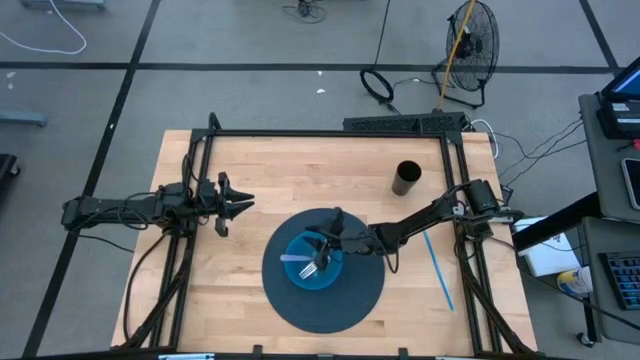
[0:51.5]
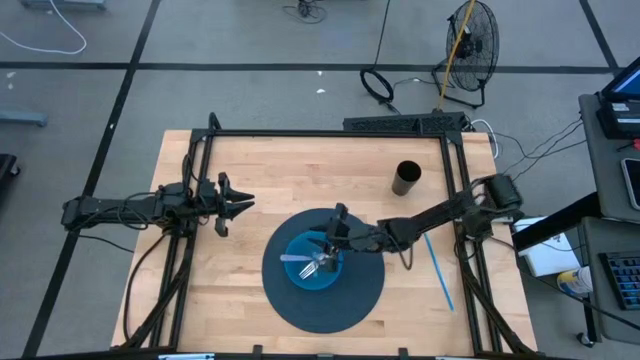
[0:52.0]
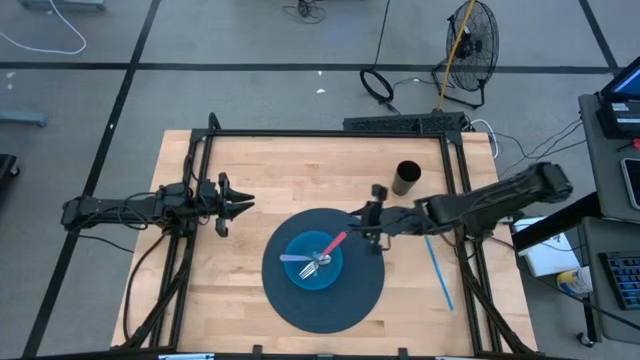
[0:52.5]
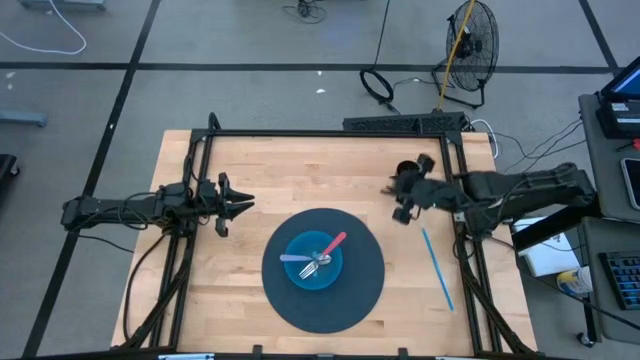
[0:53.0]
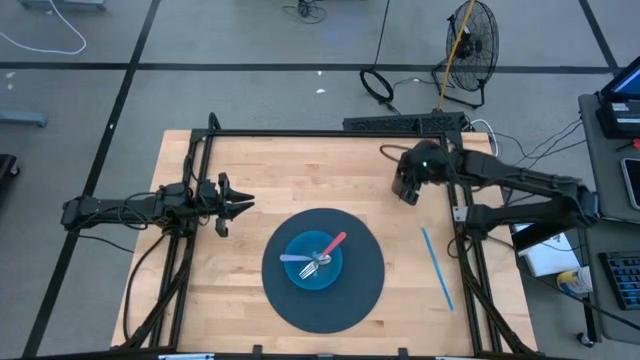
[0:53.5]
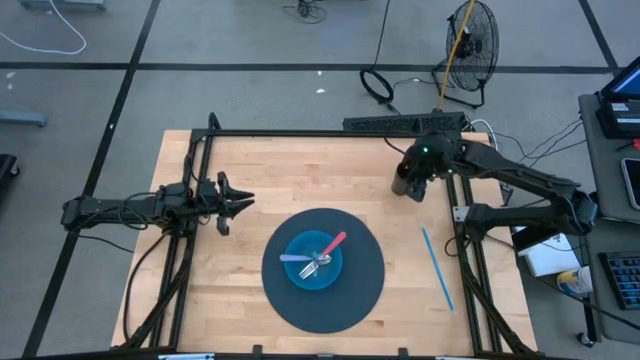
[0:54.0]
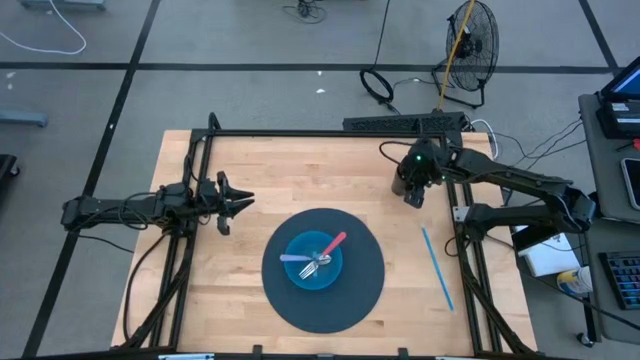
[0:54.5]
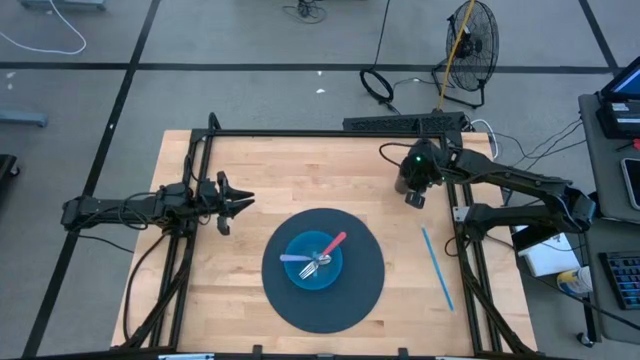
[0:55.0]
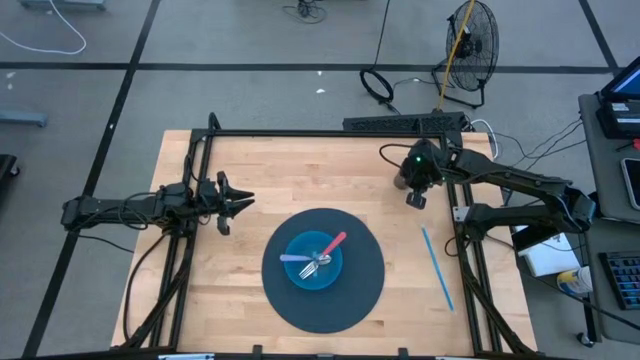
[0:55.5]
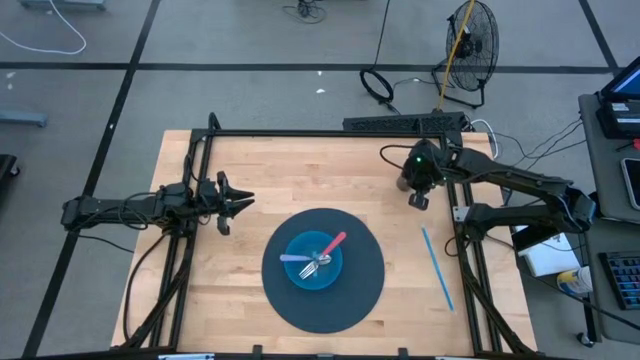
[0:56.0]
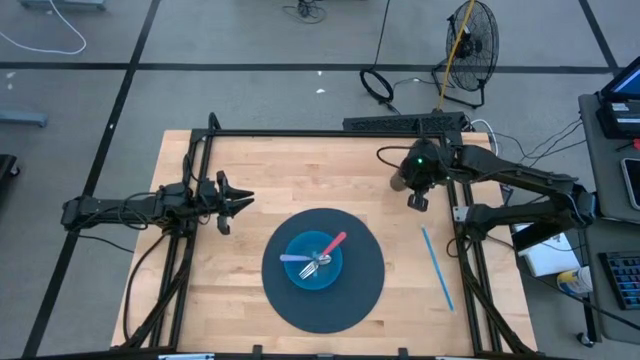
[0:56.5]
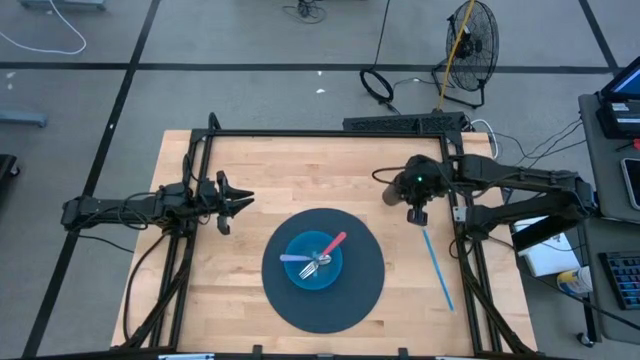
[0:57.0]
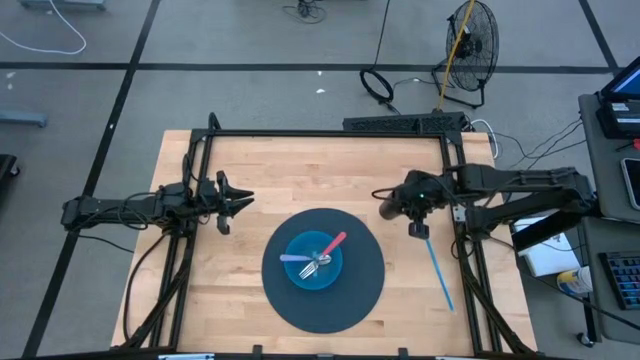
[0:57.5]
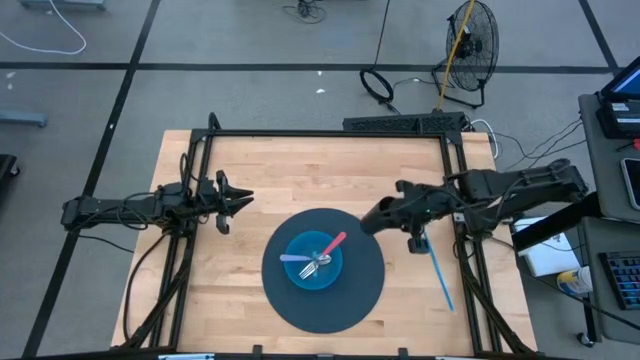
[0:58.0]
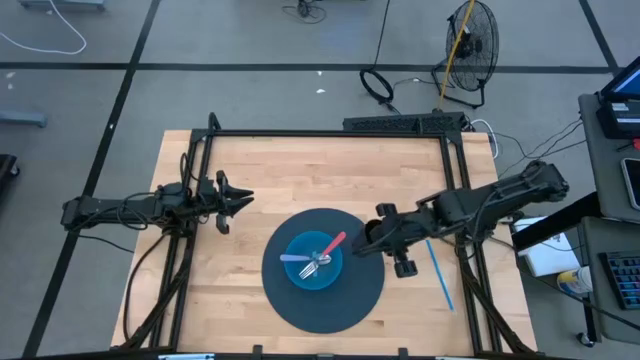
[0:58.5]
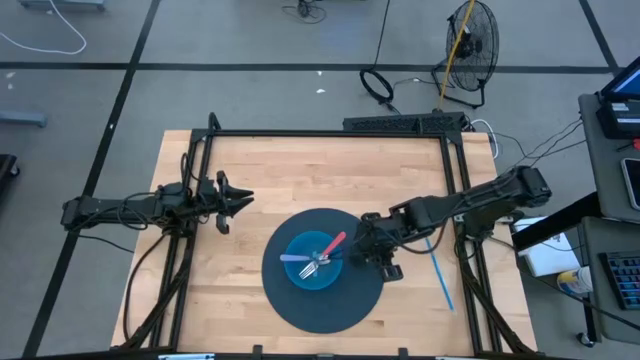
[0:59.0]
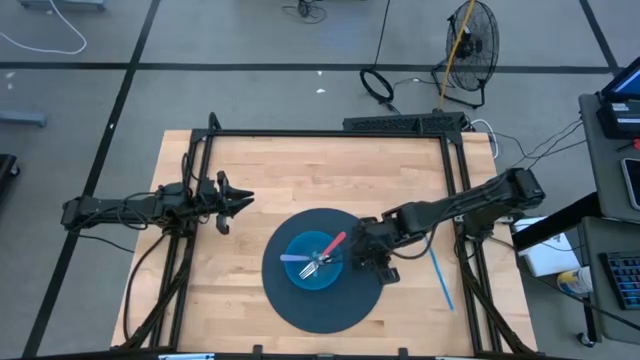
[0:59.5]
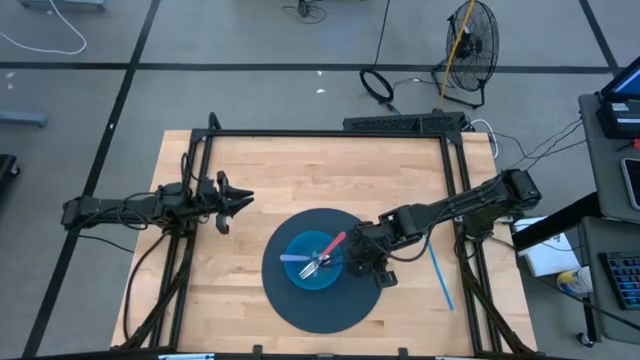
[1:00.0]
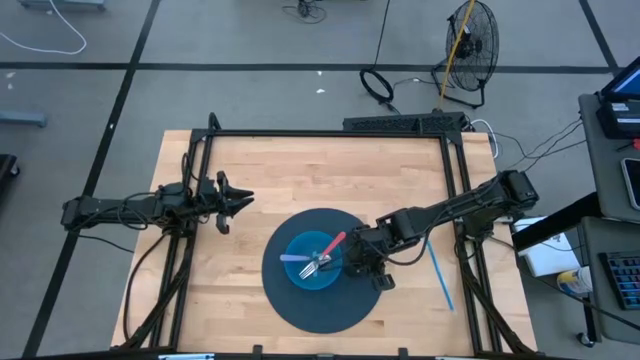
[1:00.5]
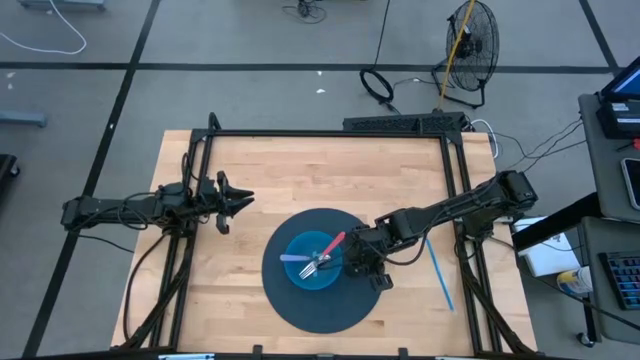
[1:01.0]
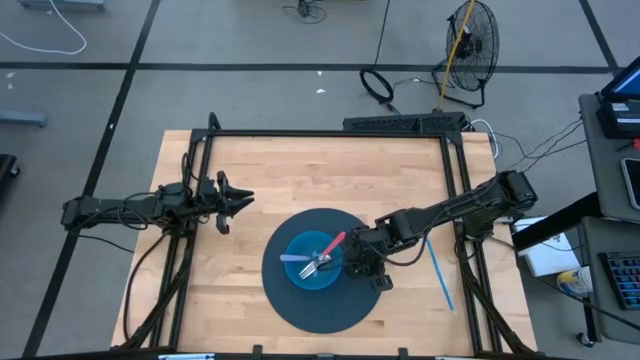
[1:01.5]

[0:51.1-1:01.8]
Task: Pick & Place Utensil
Put the black cup to the right of the blue bowl on the blue mat

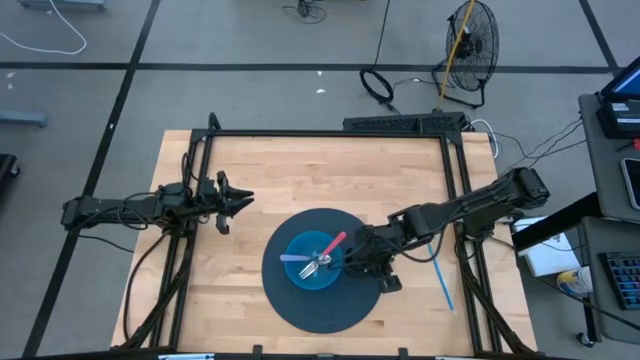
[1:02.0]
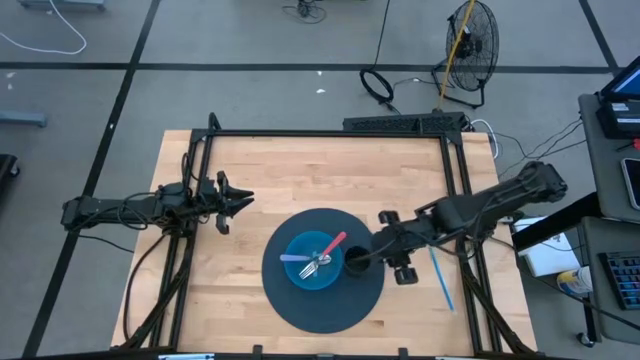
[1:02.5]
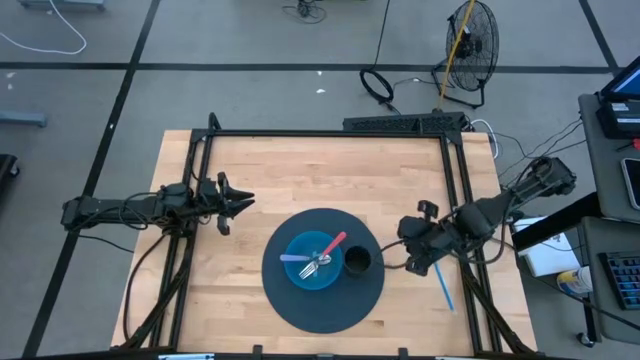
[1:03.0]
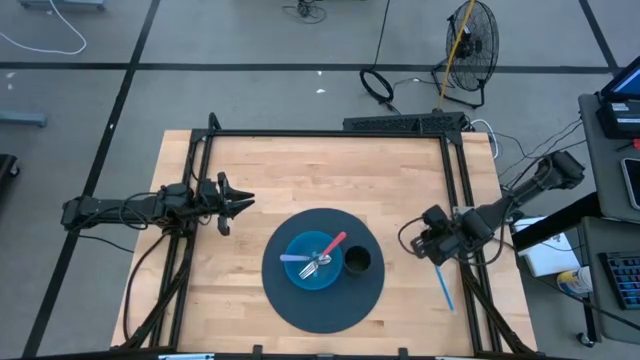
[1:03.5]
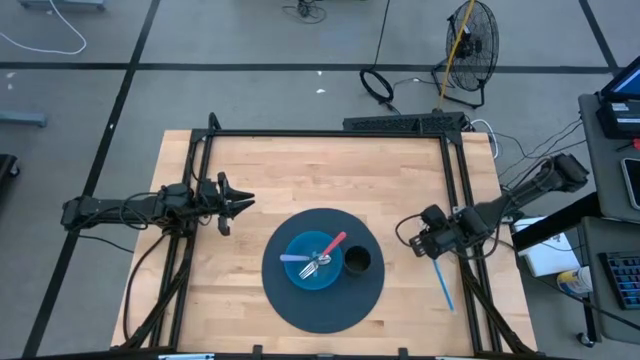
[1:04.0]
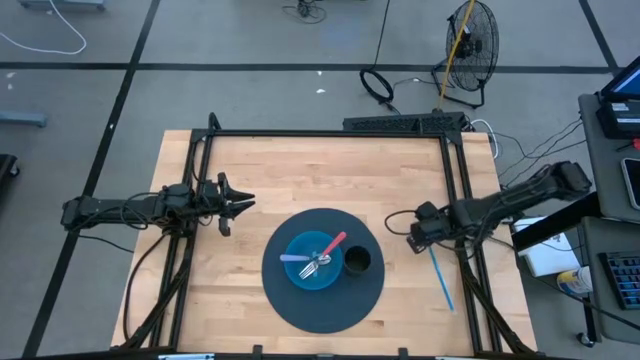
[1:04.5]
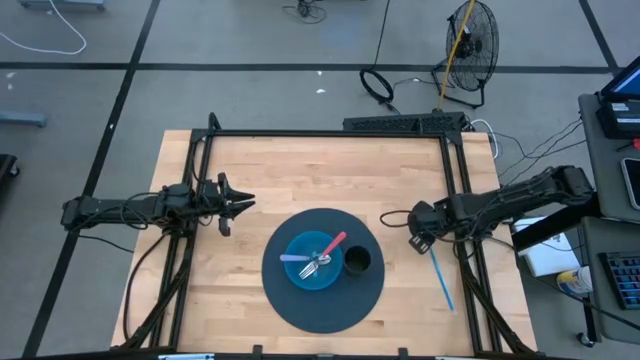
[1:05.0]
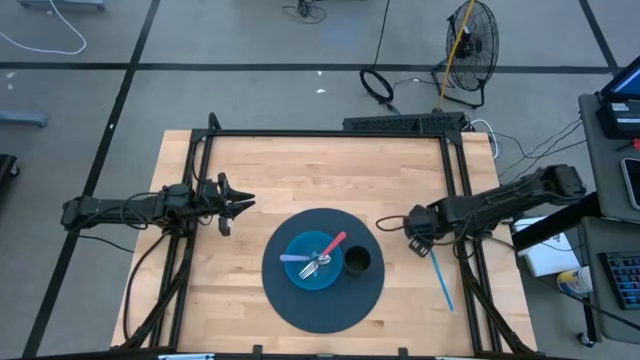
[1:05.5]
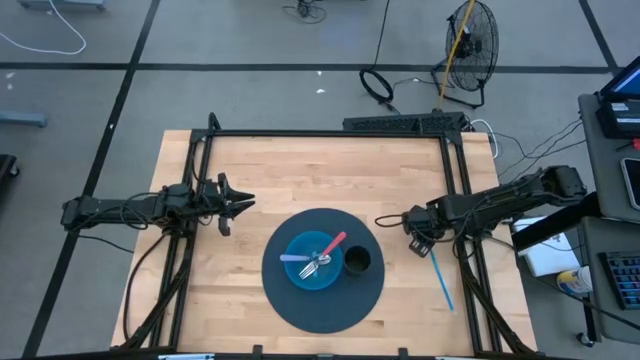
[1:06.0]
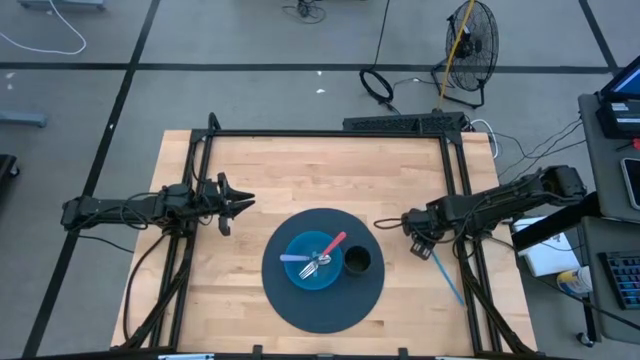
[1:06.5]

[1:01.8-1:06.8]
Put the blue straw into the black cup on the blue mat

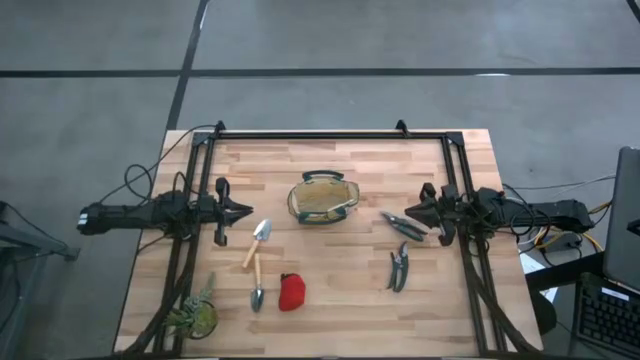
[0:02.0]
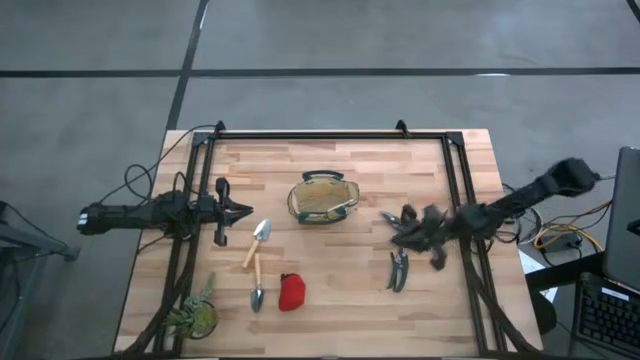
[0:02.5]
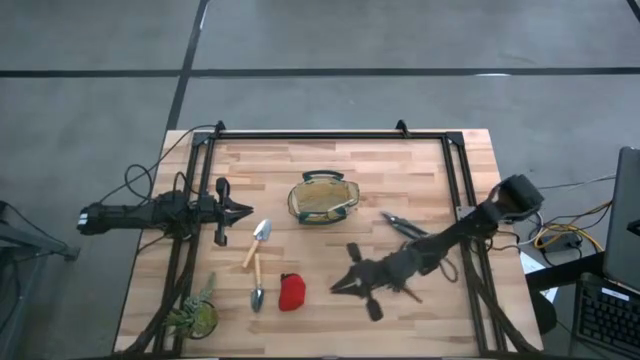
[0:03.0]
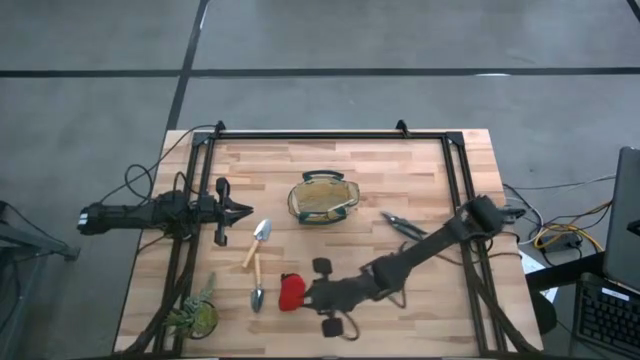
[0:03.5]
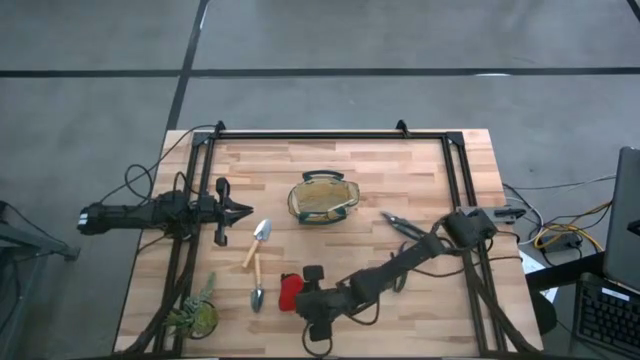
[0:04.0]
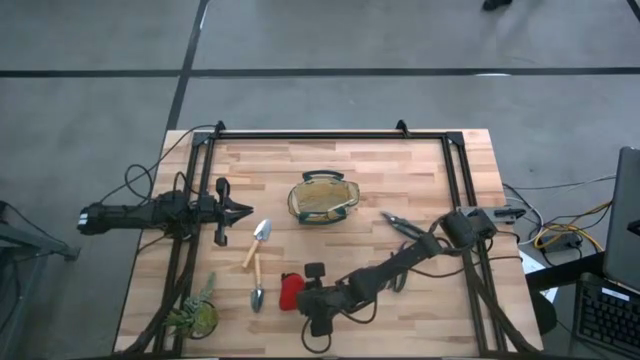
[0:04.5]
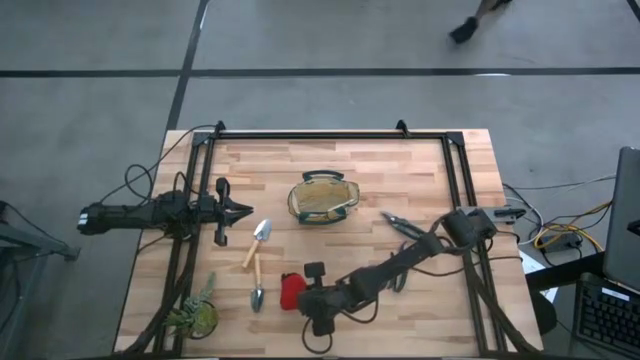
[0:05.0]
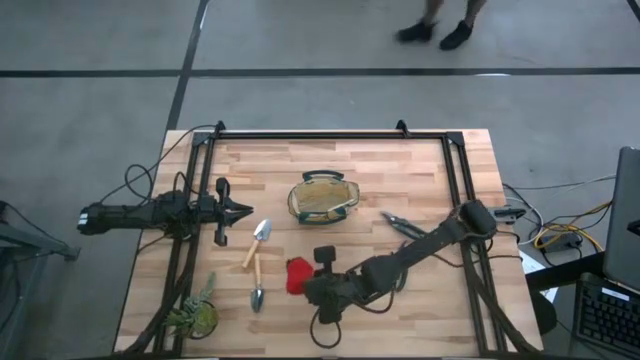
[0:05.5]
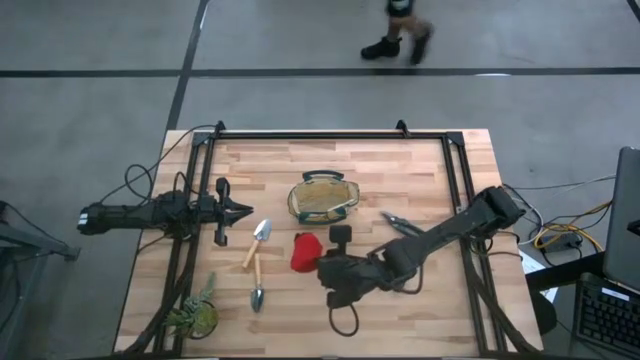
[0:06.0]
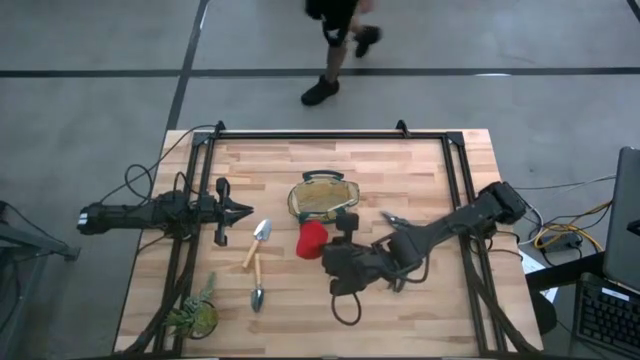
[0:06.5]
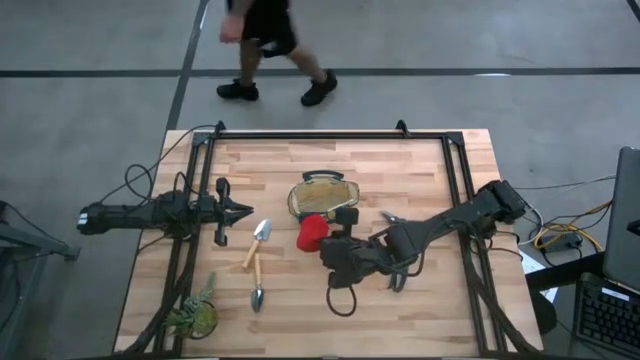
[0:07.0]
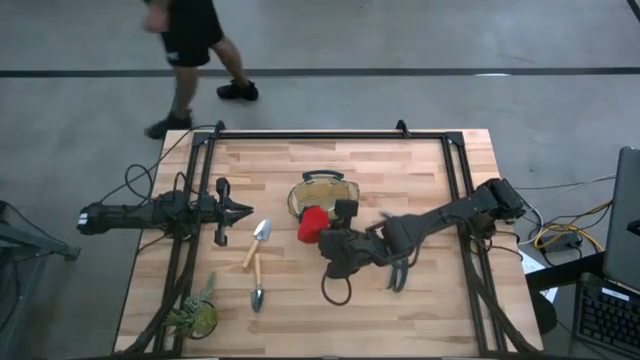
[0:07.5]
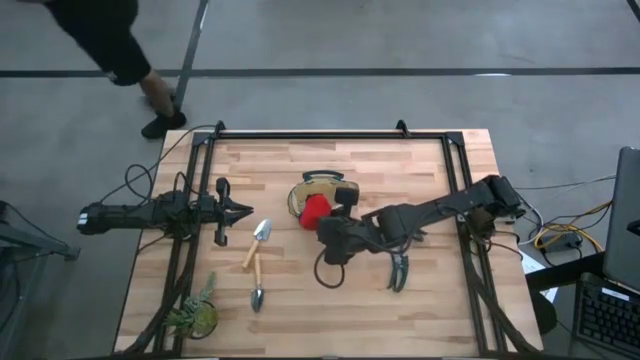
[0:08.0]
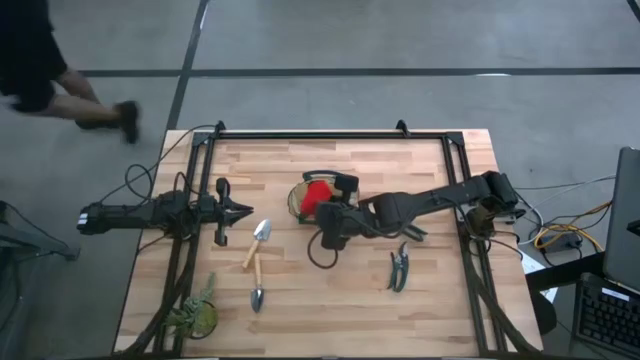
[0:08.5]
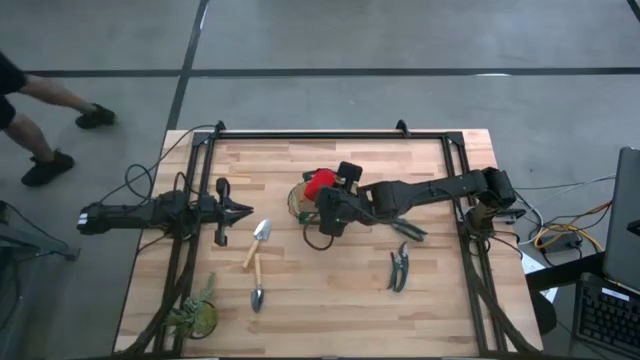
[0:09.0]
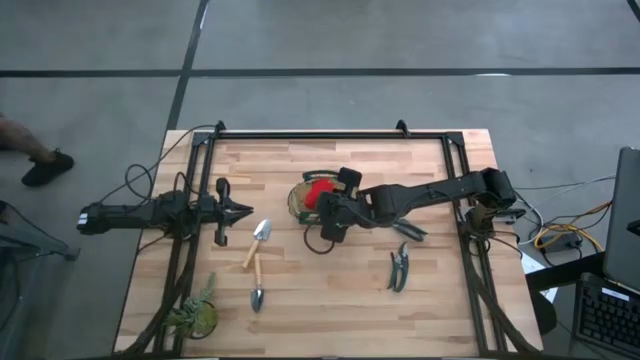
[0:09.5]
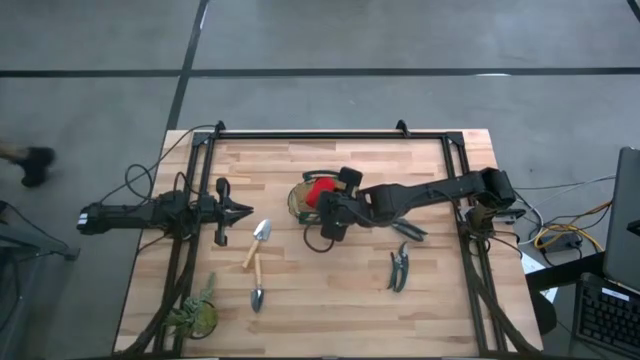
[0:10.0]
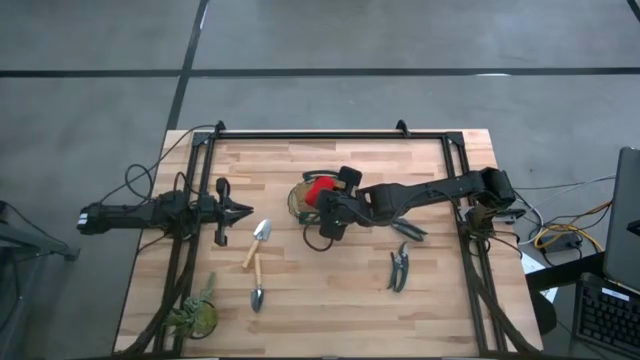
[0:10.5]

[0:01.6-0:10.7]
Task: Pick & Place Garden tools in Gardening bag
Put the red gloves into the light brown gardening bag
